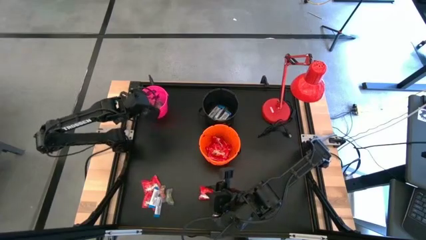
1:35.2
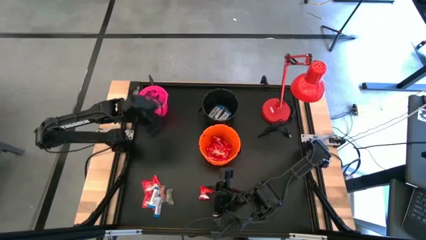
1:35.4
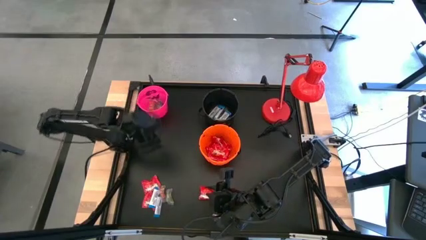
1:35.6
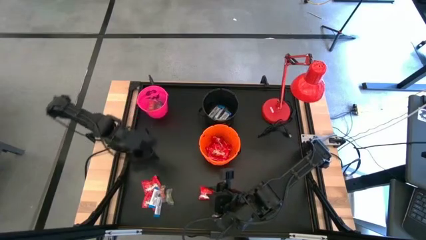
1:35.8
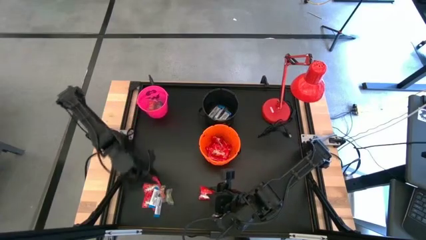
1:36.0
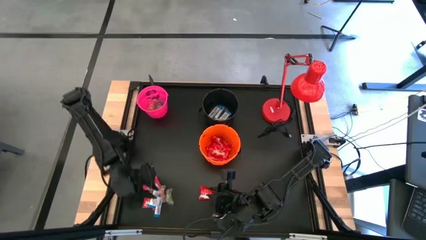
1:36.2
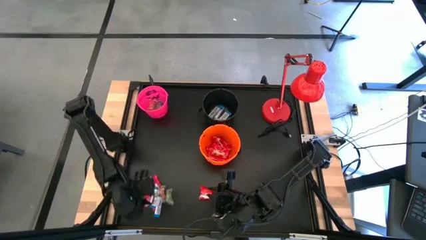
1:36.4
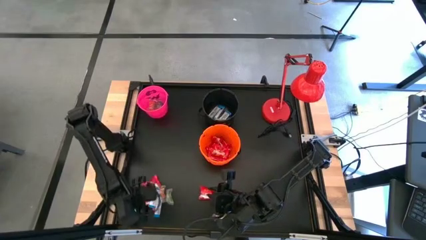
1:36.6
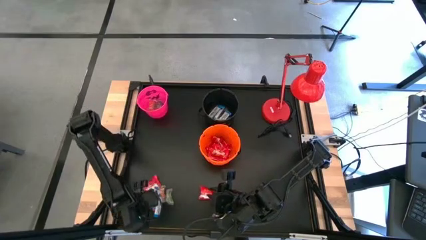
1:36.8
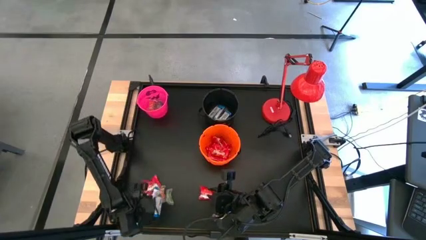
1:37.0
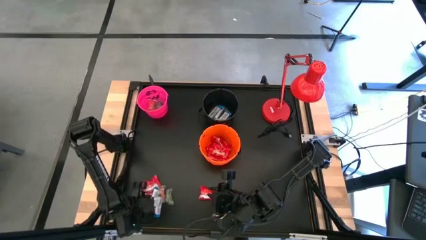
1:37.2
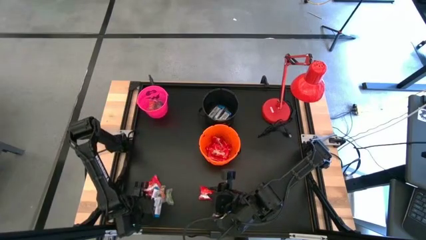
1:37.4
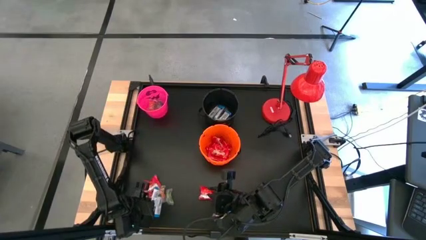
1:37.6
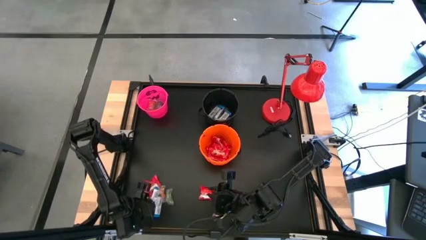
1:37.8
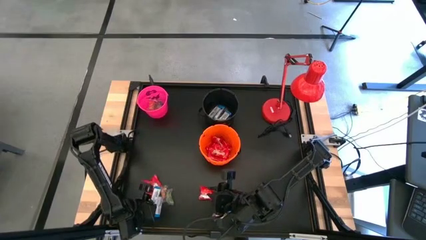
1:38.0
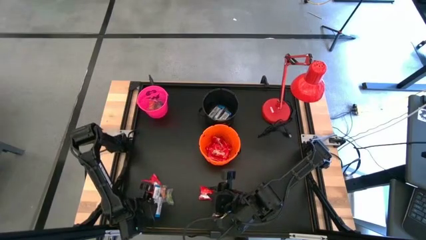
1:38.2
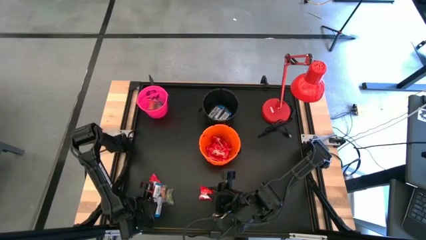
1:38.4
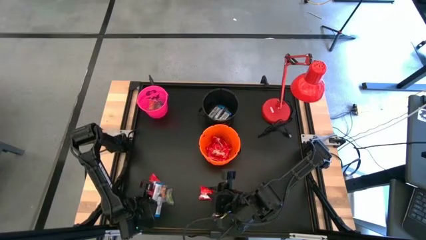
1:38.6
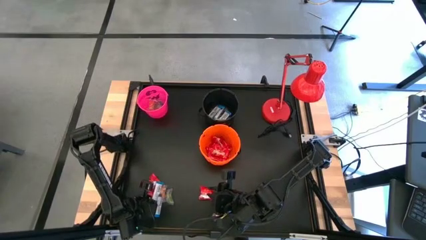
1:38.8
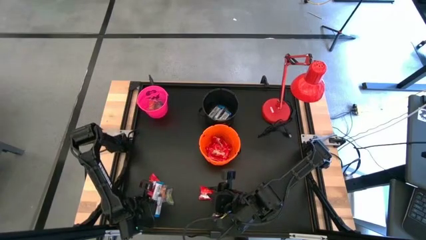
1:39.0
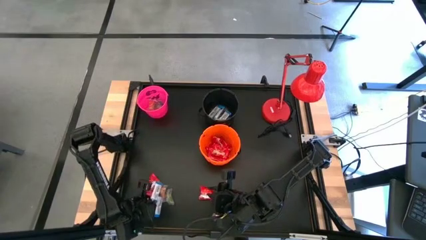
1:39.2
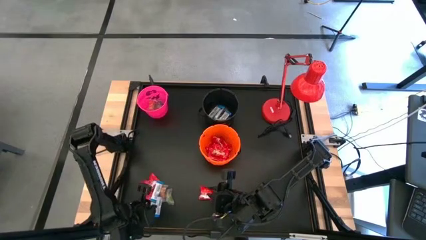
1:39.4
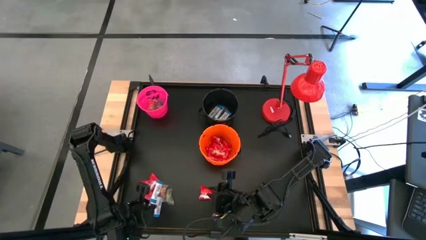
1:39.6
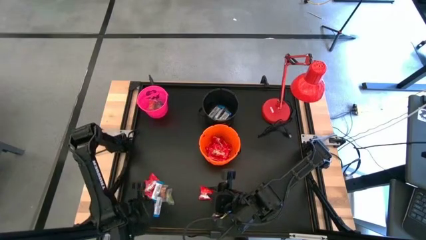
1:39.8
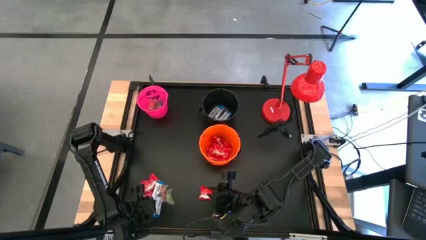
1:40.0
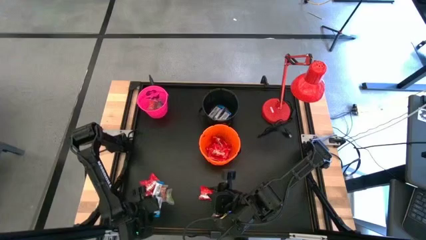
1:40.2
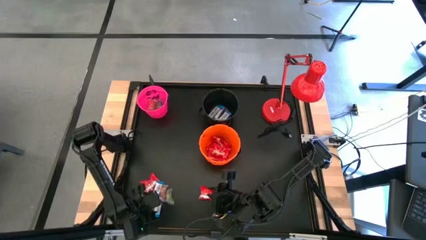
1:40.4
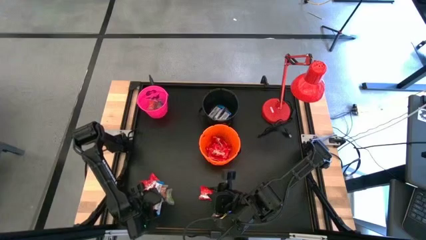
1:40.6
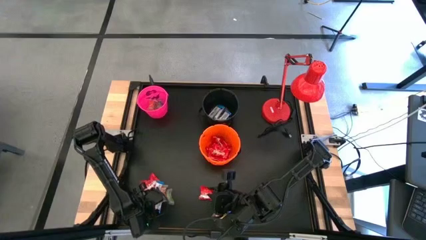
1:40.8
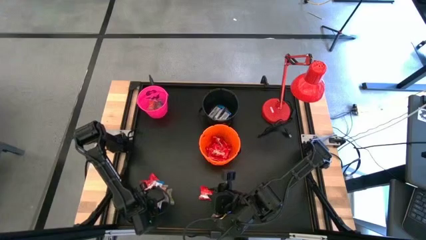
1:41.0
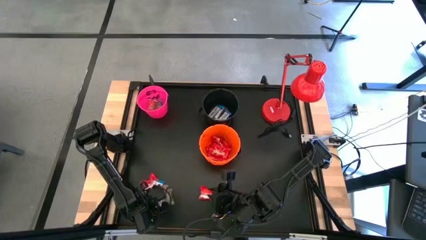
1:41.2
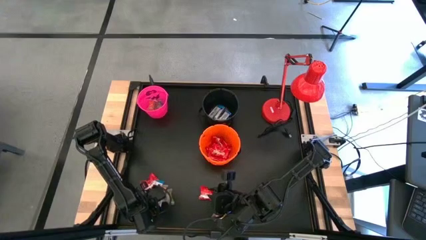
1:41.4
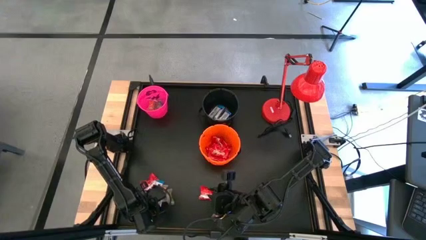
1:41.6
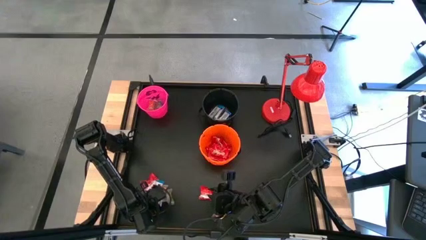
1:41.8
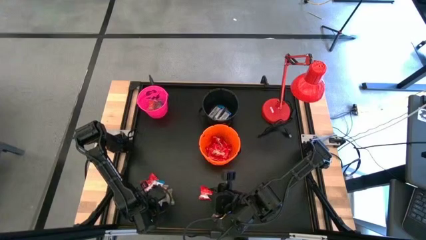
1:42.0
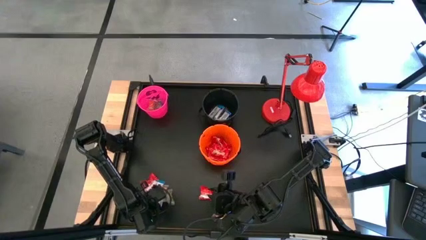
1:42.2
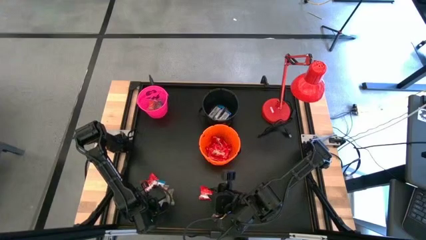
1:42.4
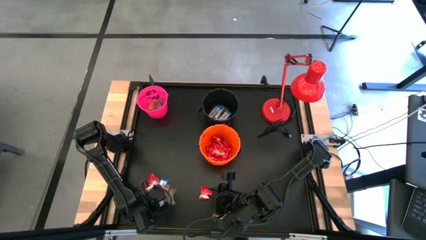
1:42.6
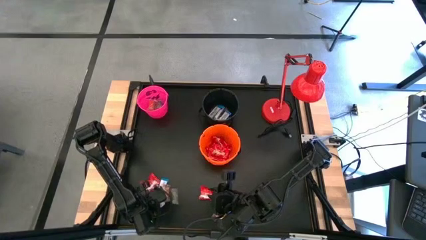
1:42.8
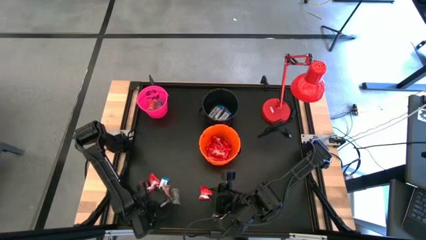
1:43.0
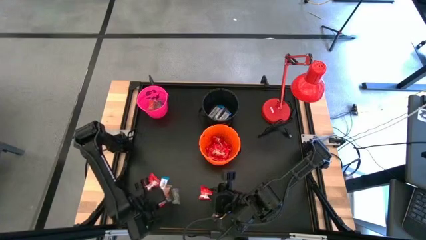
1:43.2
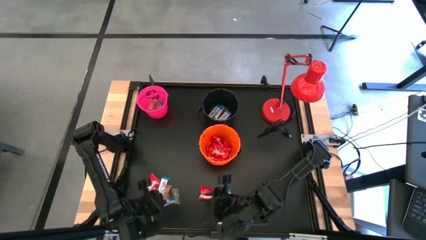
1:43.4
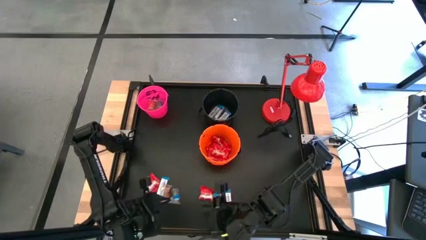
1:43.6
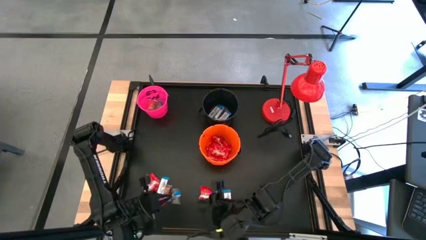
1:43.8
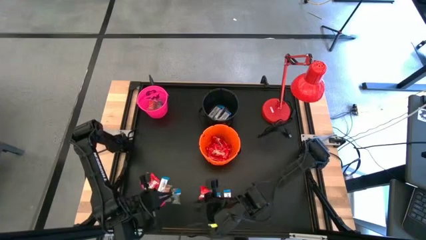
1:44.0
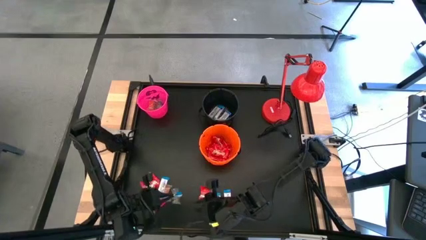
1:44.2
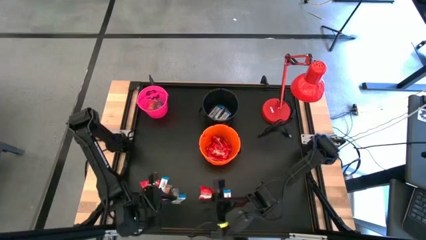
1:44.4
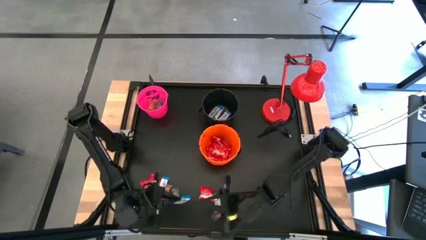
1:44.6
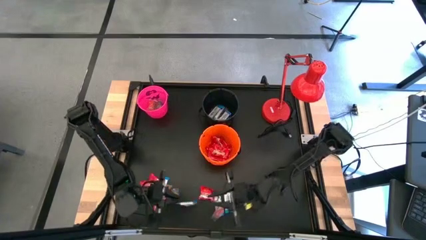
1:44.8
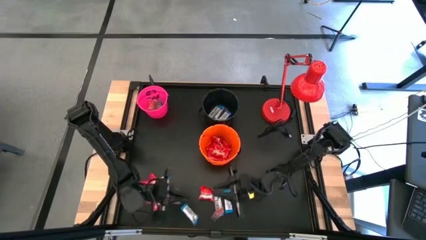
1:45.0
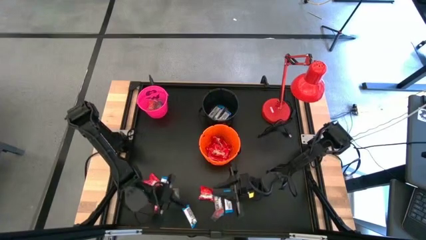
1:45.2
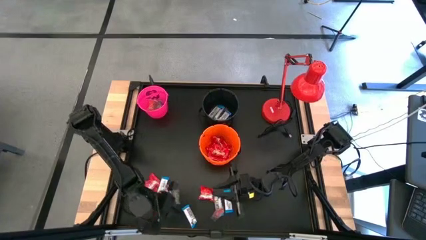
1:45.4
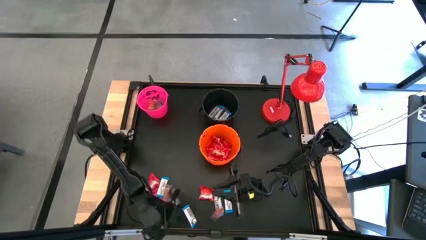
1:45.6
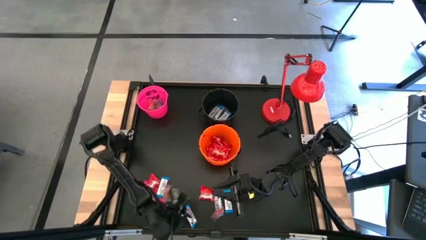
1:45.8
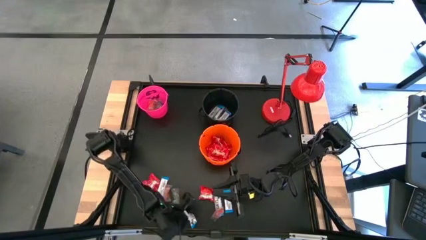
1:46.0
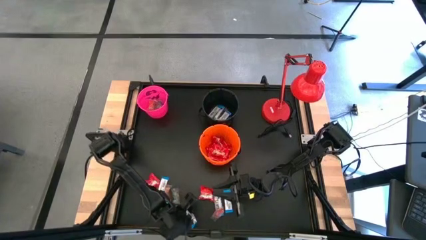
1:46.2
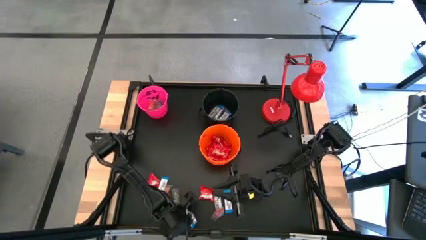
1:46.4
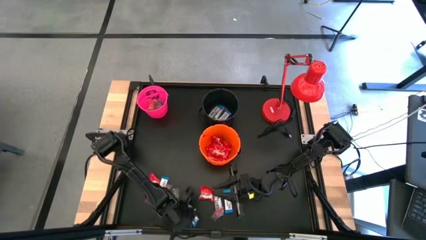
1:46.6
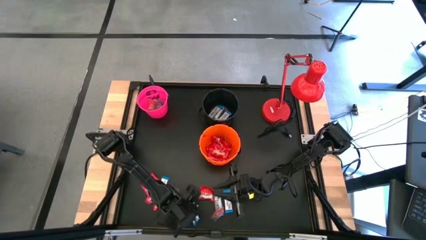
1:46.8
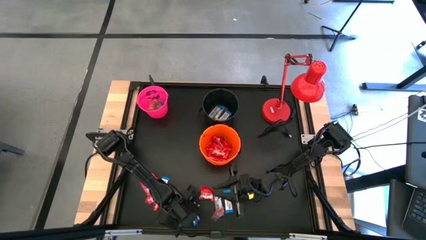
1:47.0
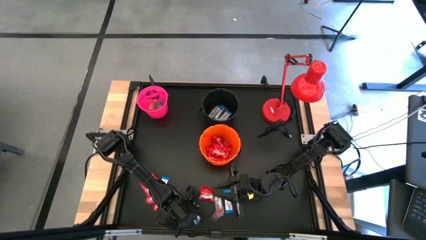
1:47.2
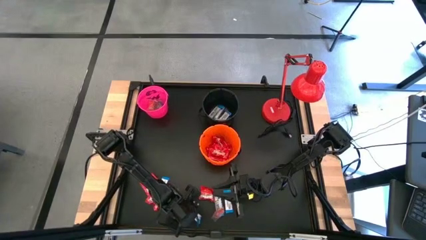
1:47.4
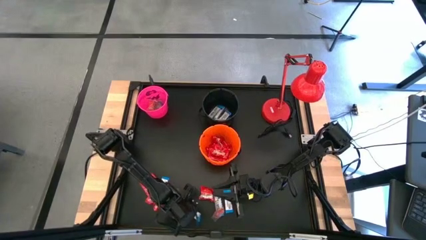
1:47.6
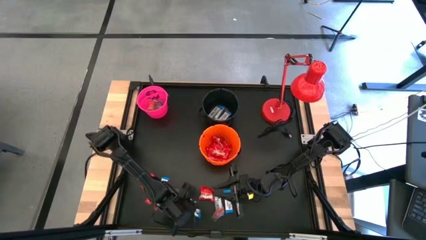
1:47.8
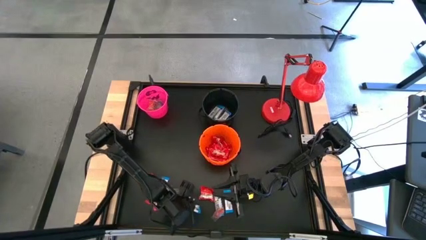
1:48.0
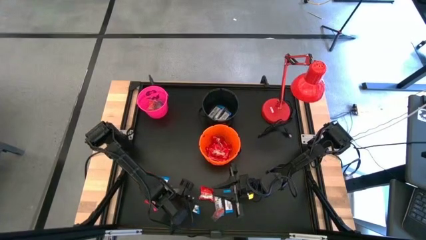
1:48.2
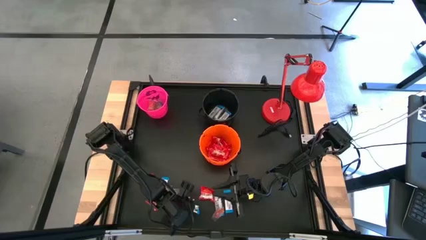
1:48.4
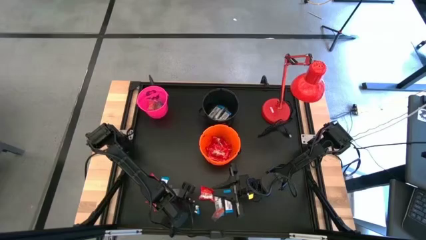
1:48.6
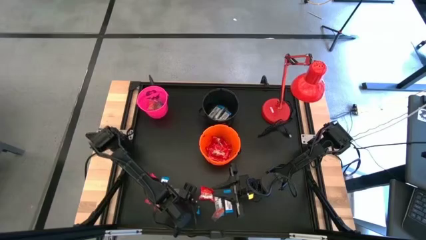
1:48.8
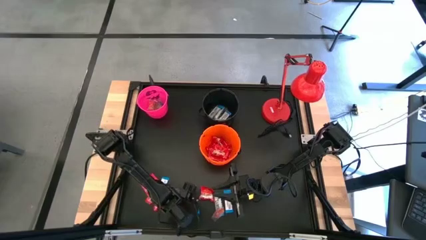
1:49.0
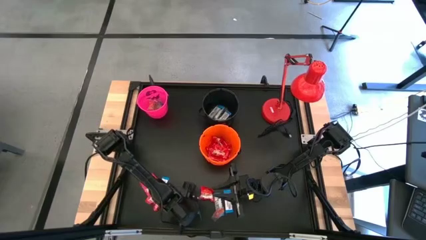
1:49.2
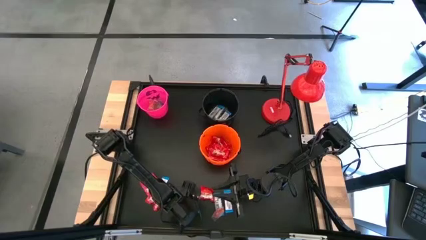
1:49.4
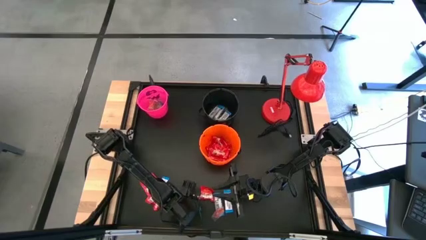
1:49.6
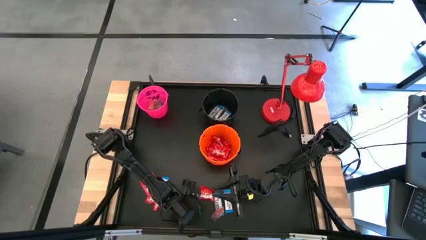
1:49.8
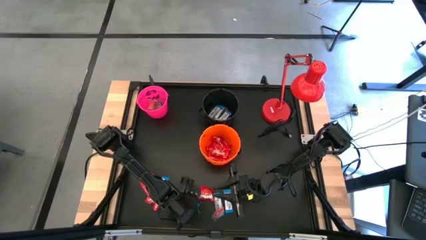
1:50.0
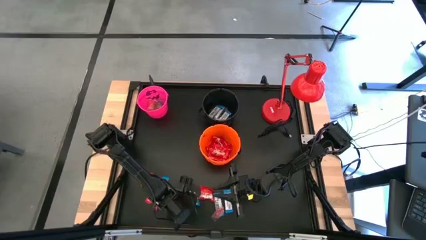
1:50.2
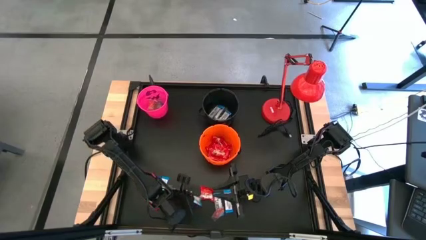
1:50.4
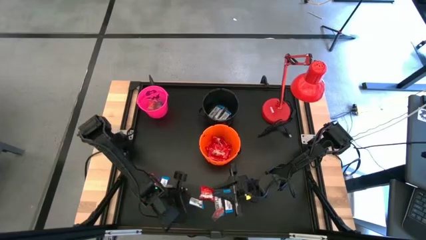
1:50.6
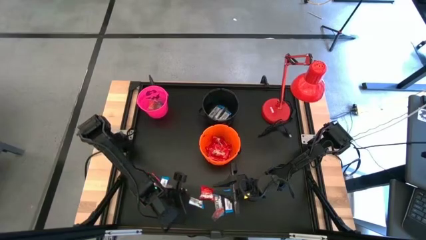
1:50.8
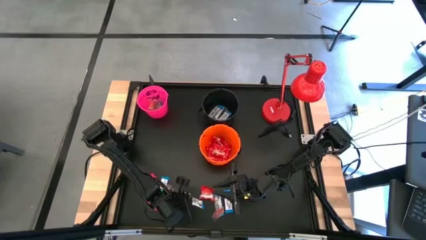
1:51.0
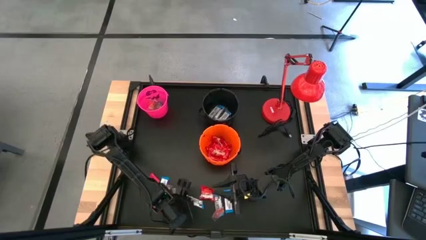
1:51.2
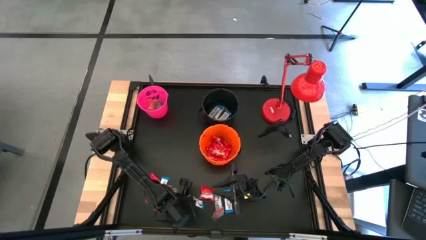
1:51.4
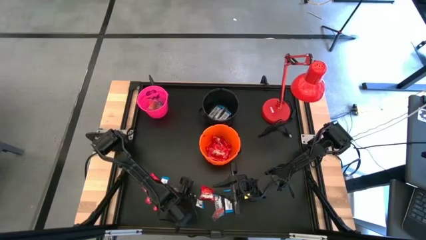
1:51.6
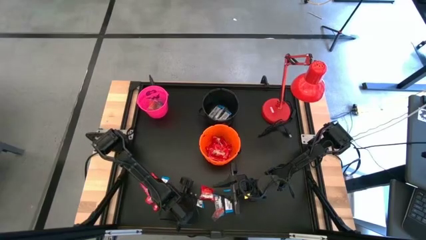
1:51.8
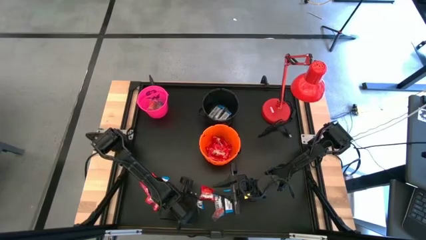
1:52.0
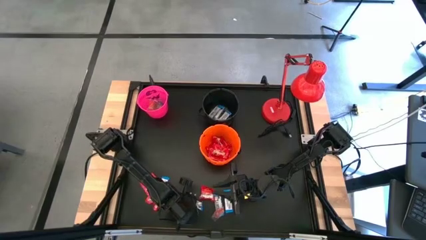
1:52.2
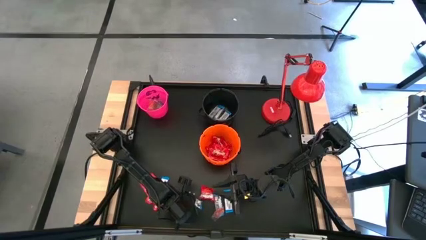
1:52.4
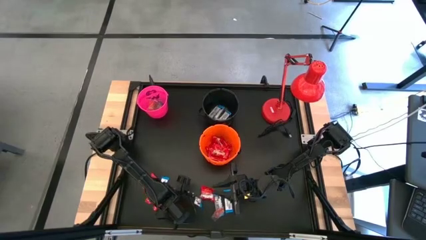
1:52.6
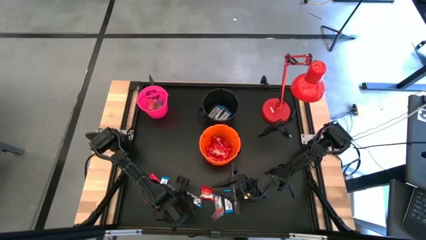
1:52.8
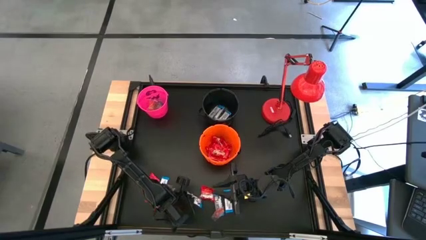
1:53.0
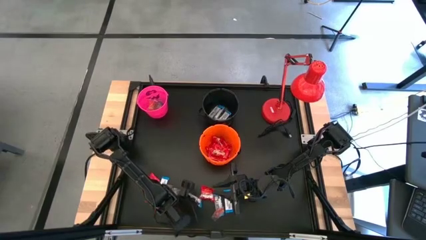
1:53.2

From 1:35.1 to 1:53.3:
Task: Sort candy
Put the white chocolate into the black bucket
